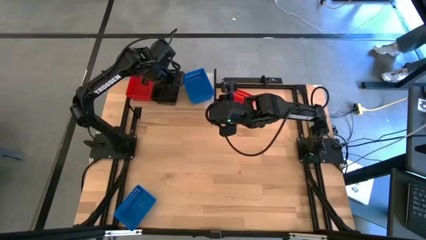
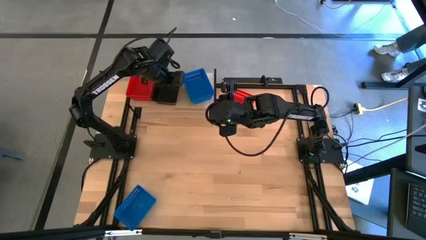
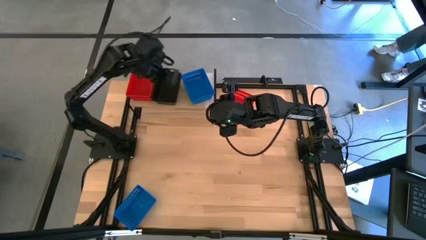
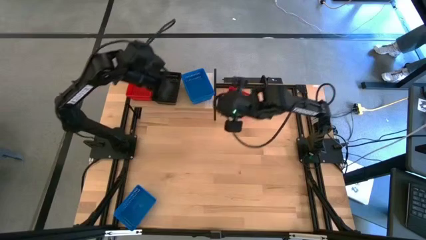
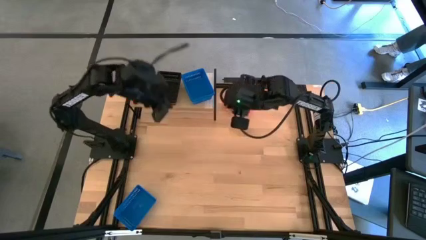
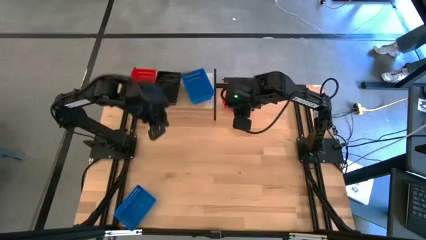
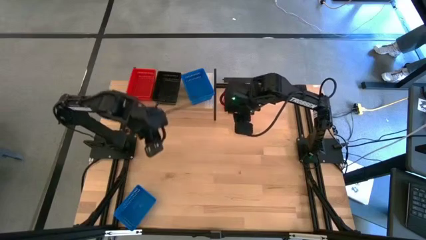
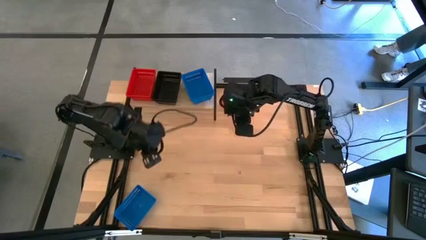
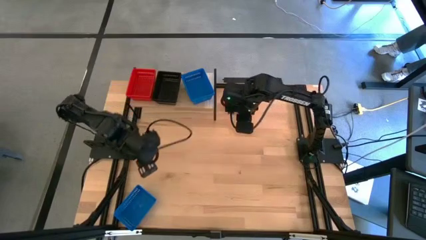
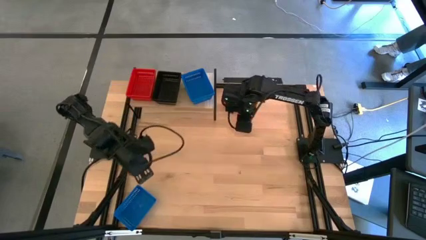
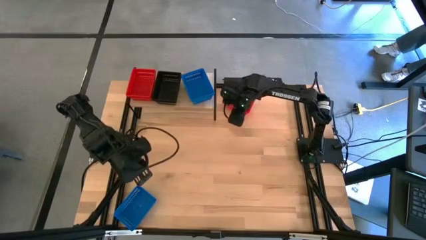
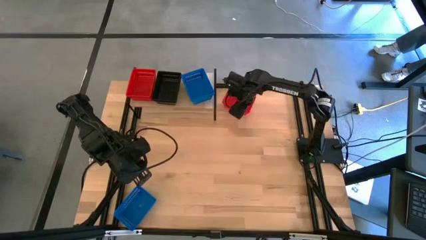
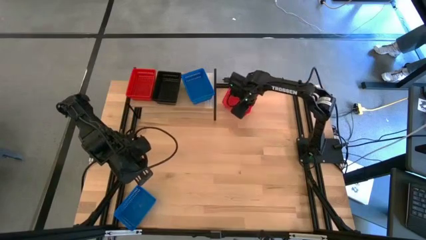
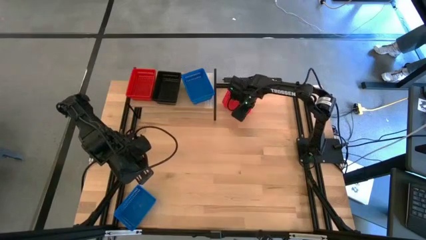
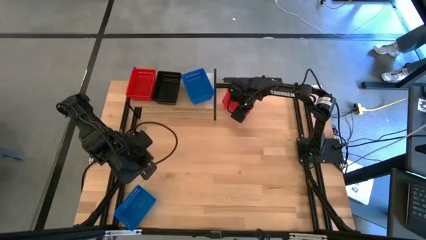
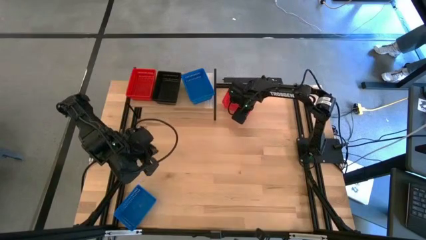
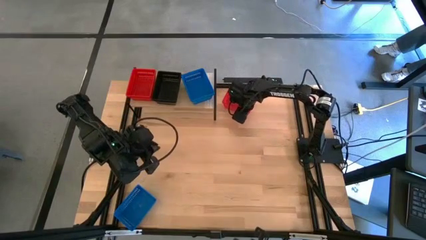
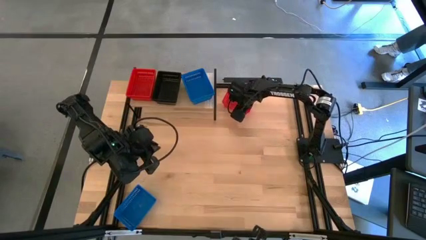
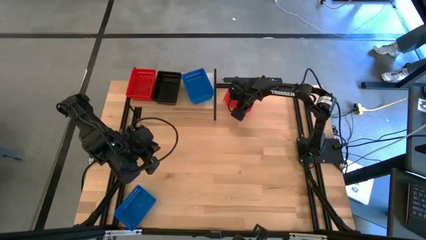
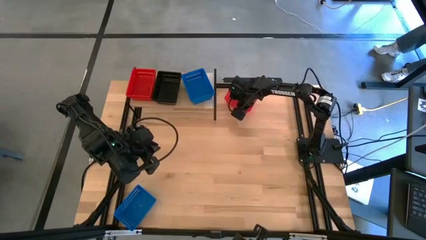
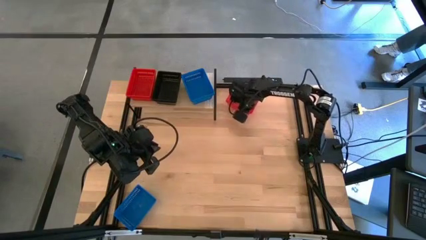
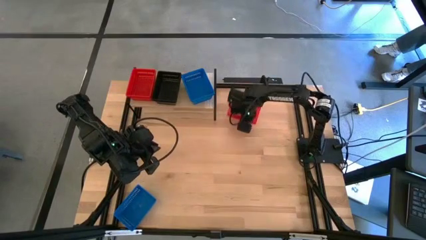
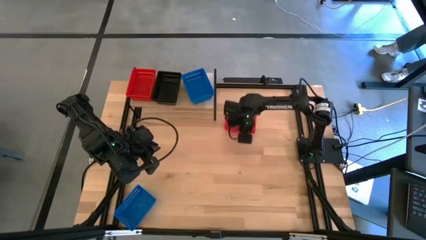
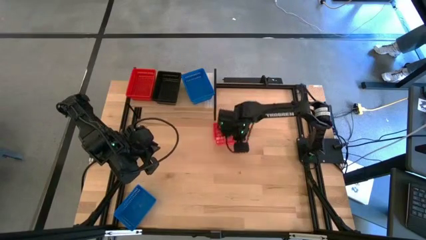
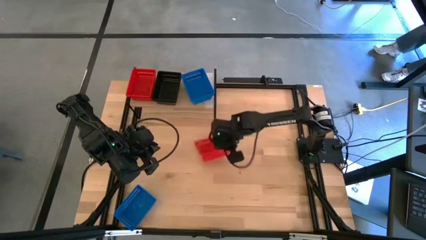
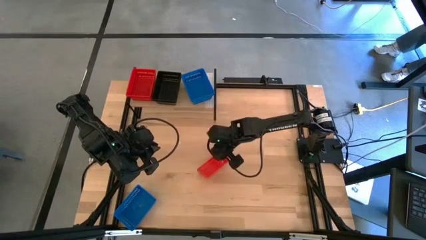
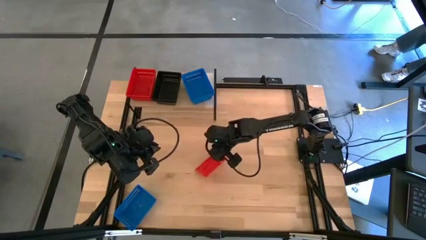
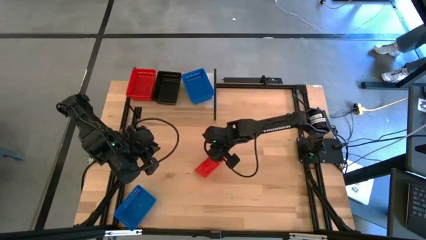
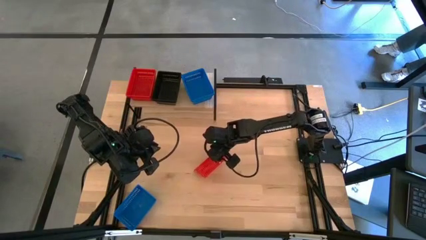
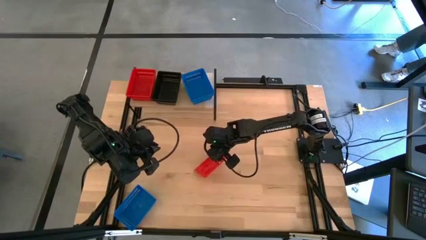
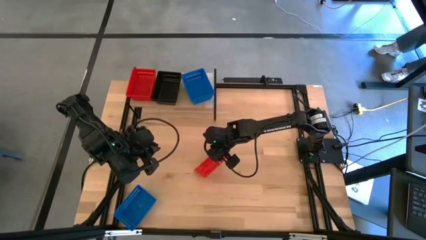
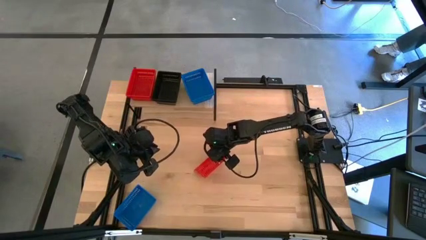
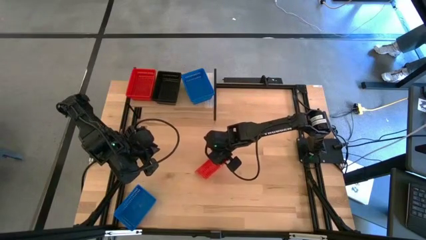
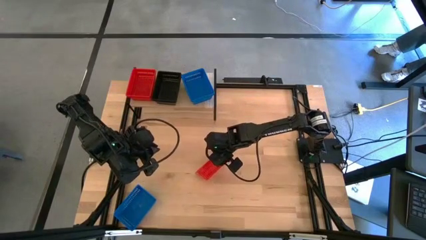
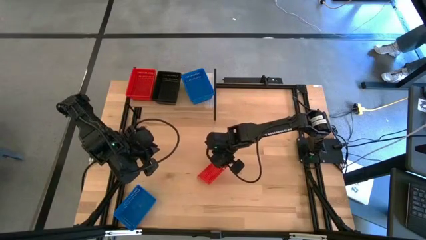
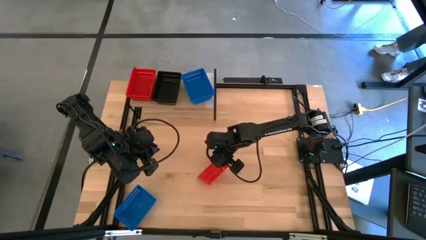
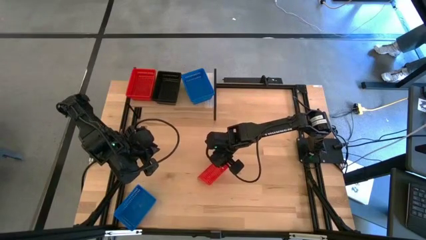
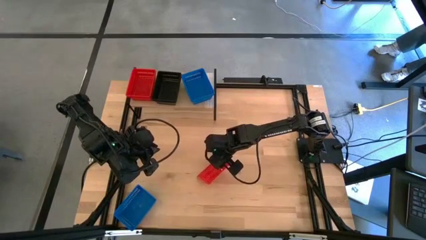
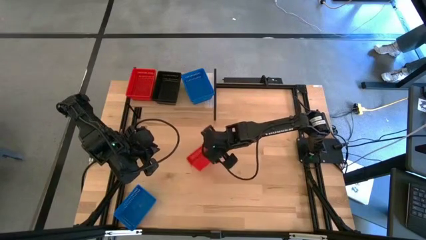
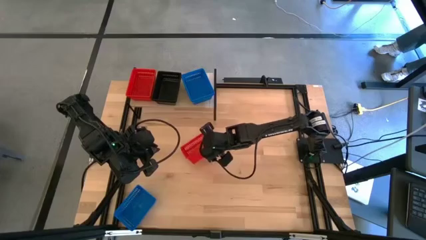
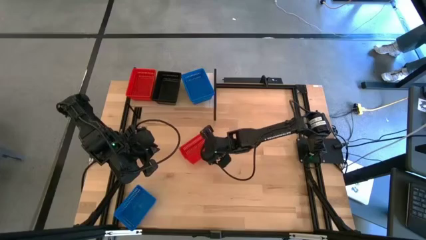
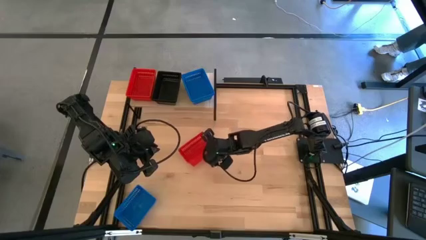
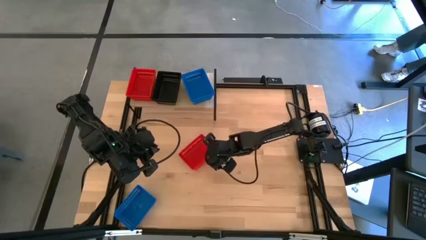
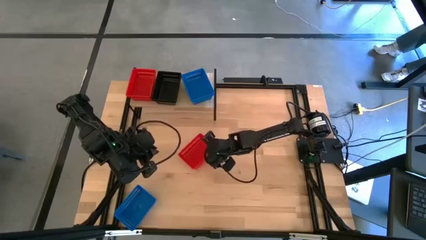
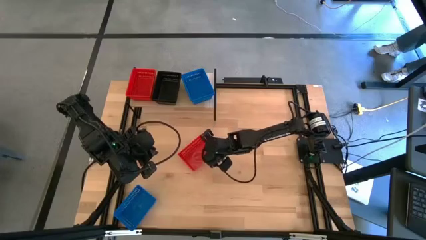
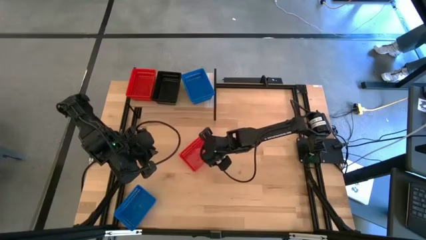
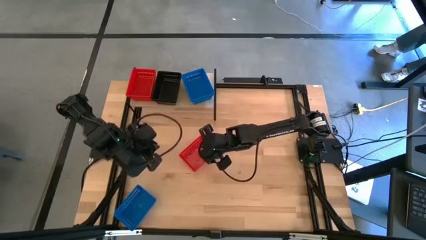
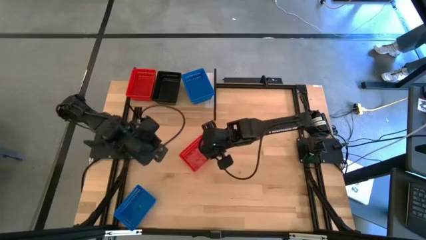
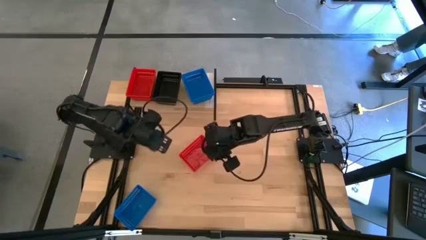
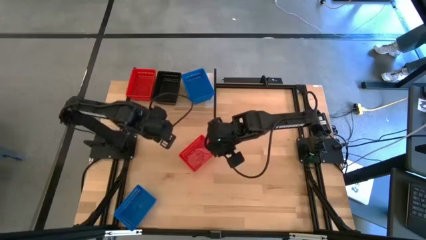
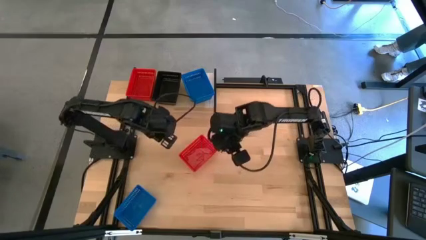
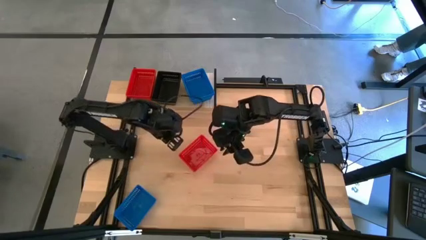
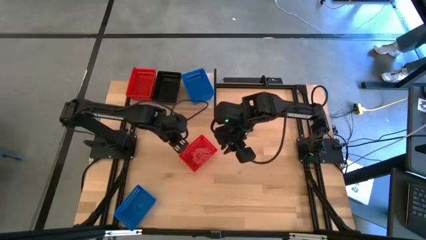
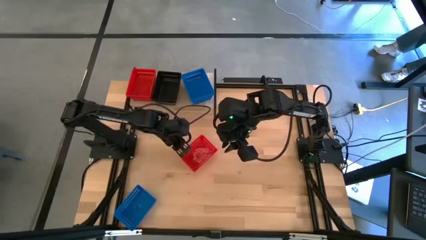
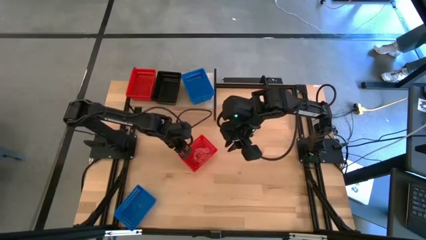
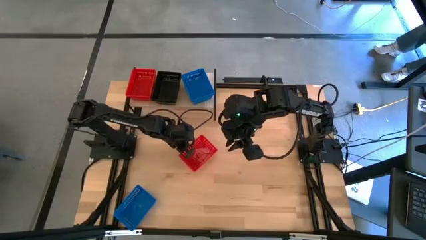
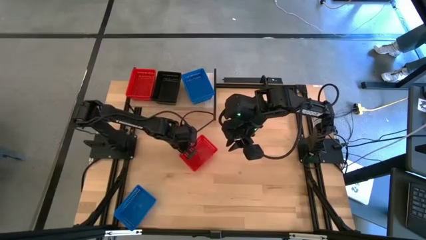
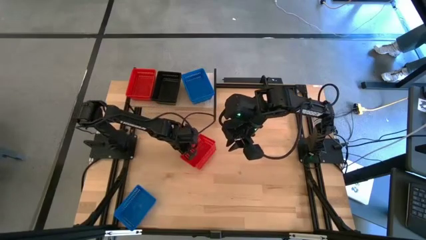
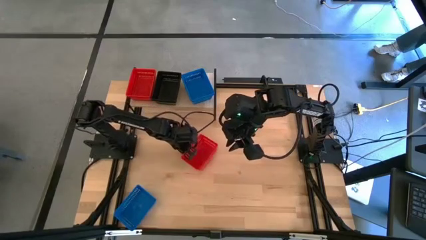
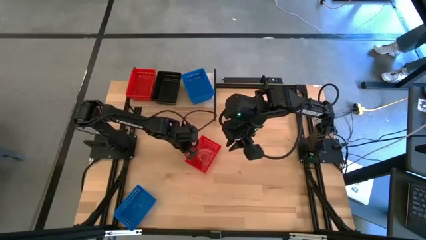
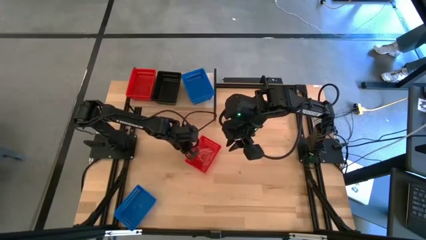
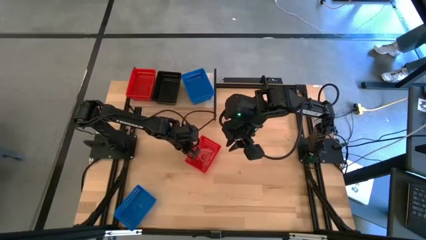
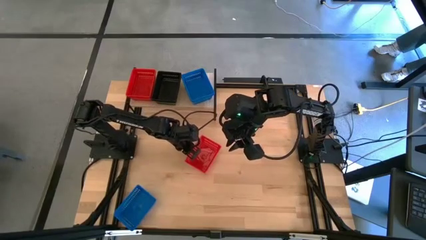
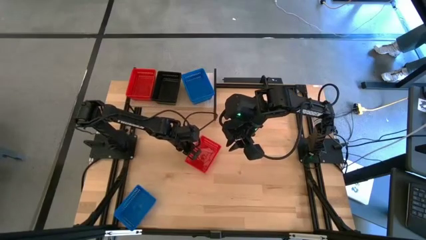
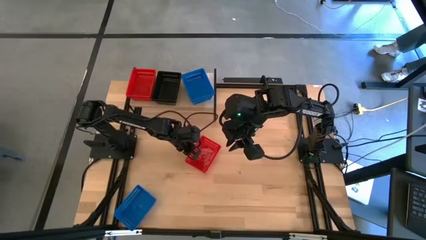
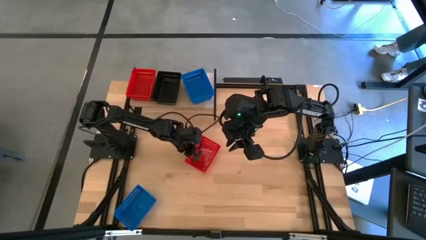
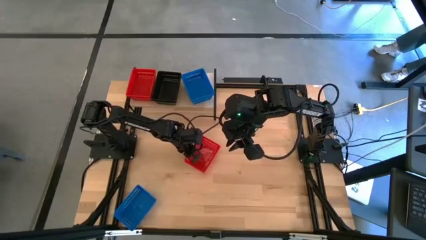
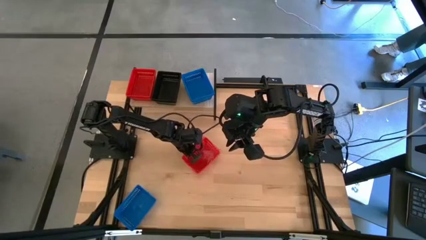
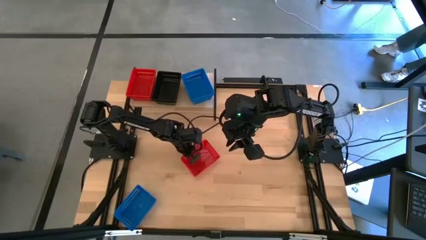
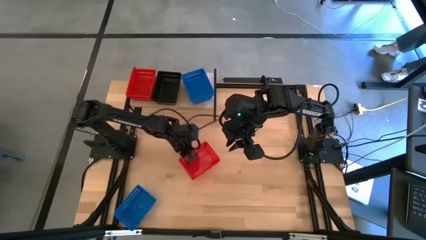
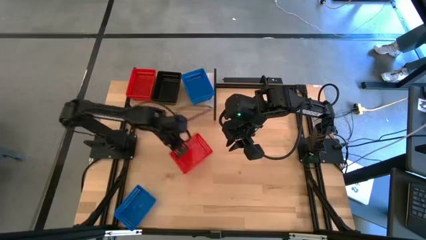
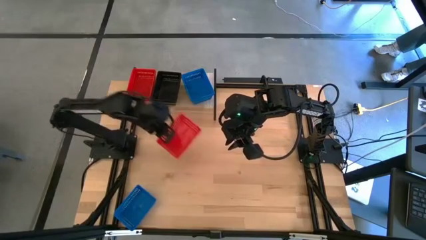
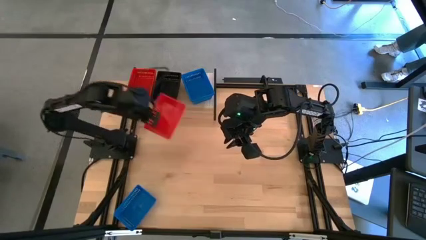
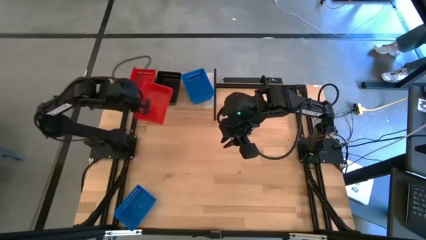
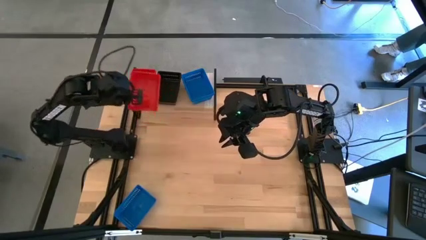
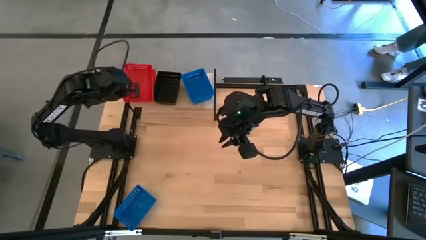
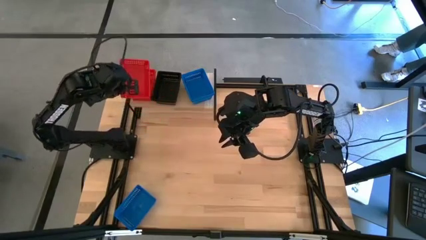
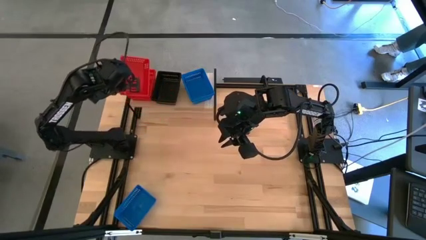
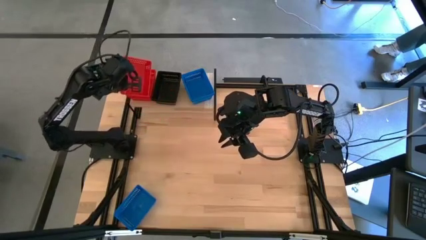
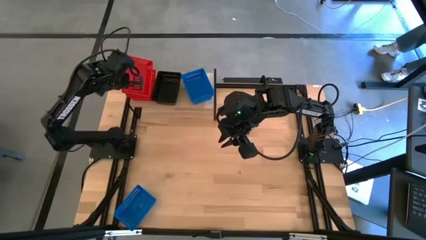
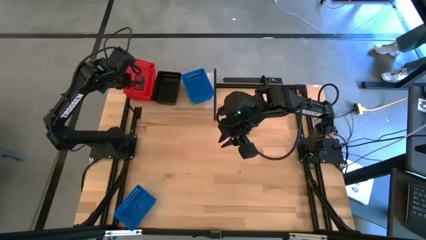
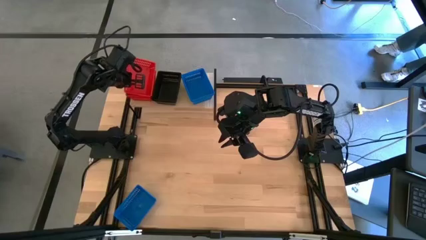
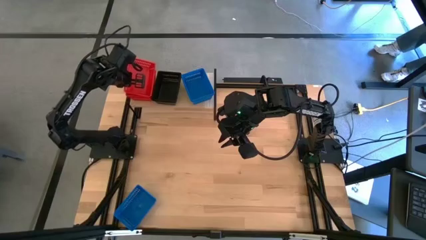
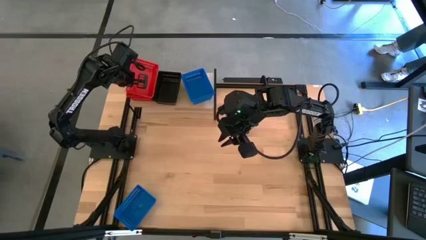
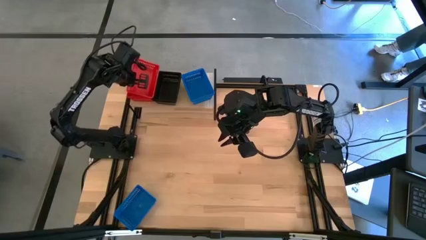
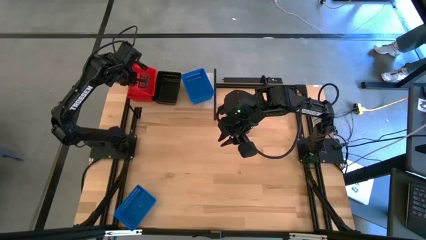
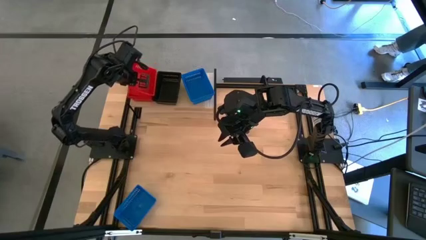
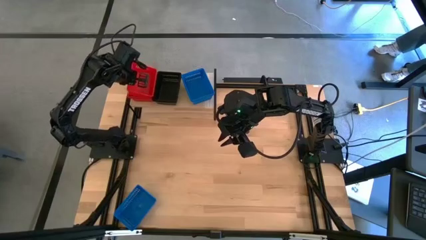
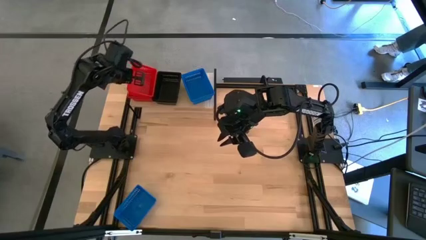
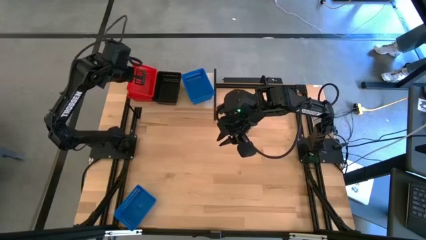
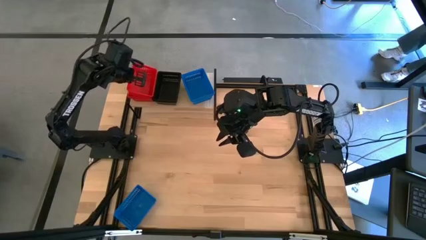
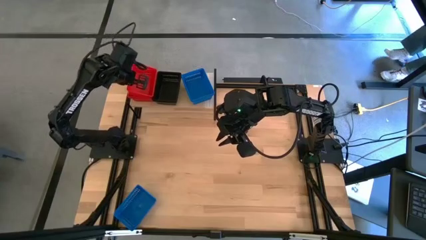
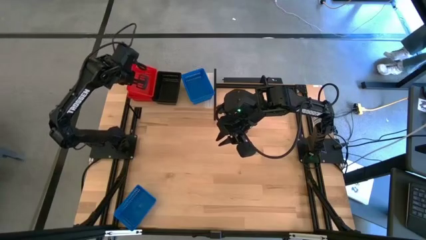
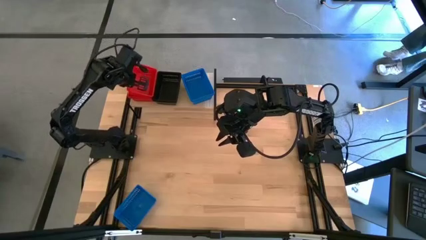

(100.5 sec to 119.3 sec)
Task: Stack baskets on shelf by color
Stack the red bin on the stacked red bins on the shelf
